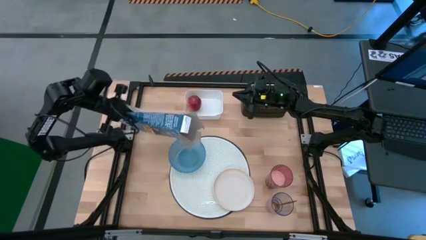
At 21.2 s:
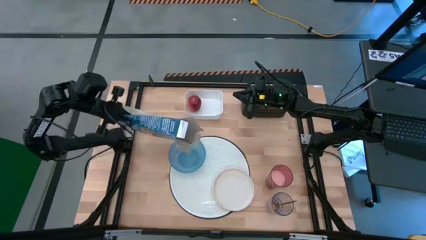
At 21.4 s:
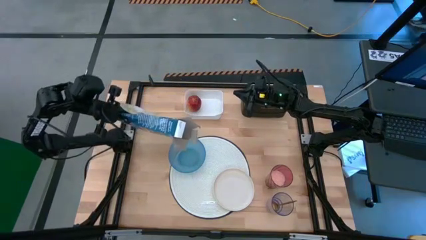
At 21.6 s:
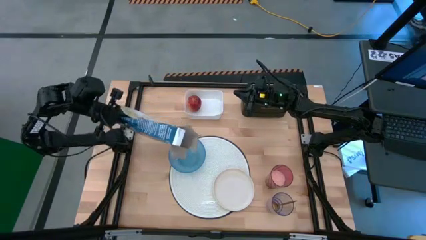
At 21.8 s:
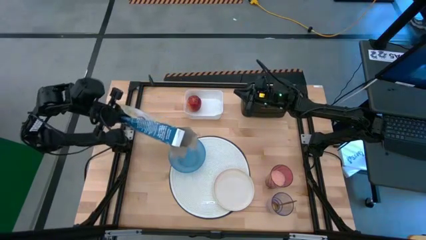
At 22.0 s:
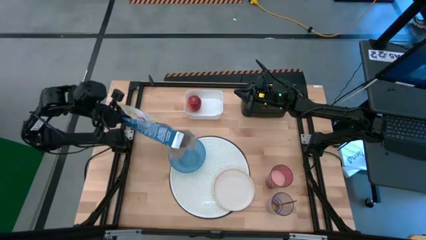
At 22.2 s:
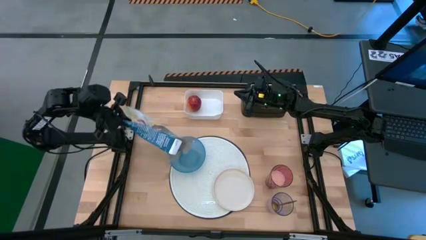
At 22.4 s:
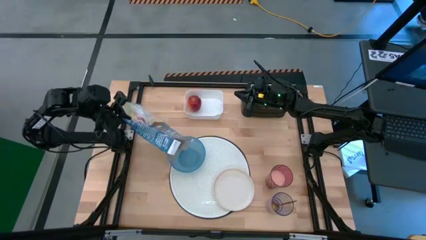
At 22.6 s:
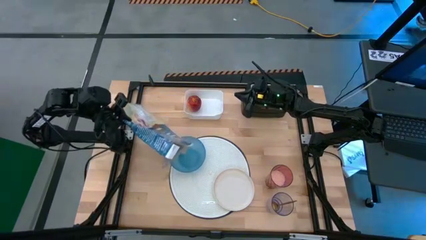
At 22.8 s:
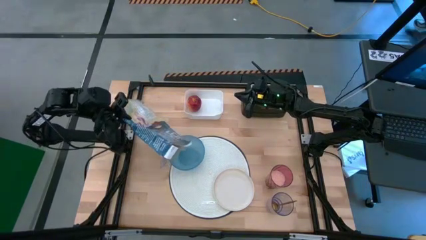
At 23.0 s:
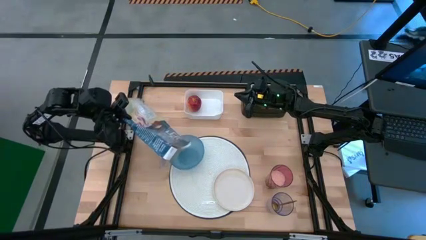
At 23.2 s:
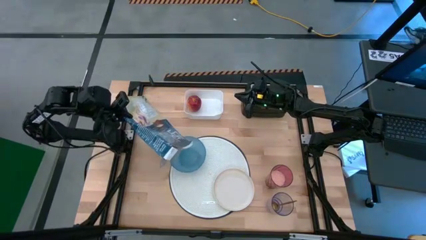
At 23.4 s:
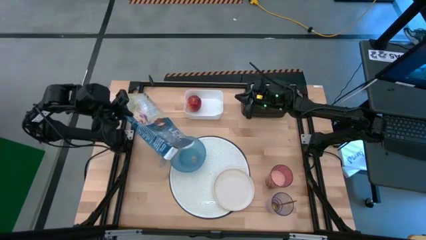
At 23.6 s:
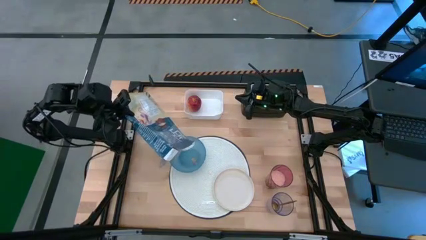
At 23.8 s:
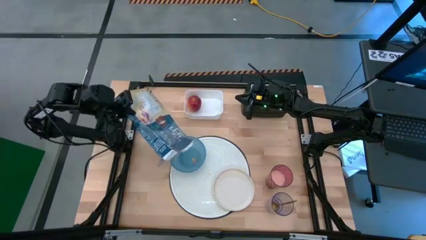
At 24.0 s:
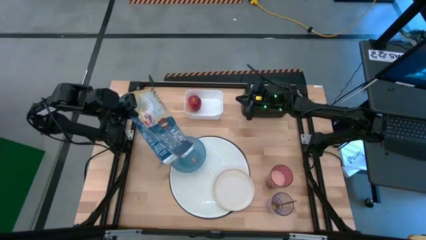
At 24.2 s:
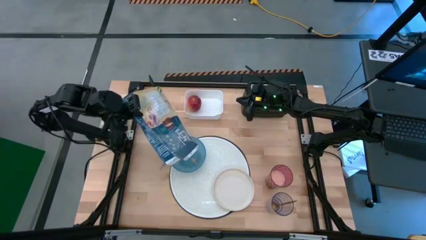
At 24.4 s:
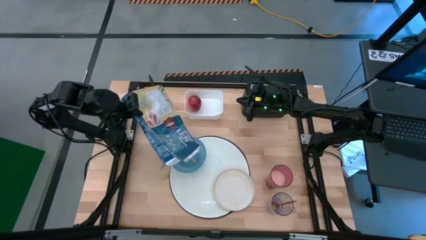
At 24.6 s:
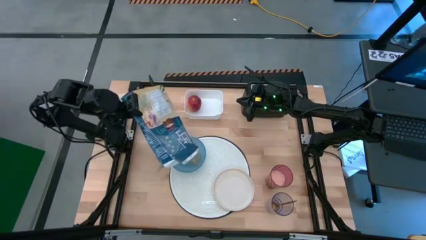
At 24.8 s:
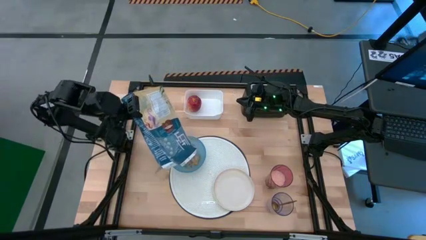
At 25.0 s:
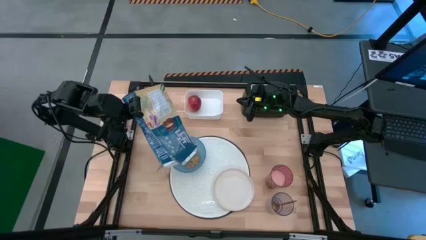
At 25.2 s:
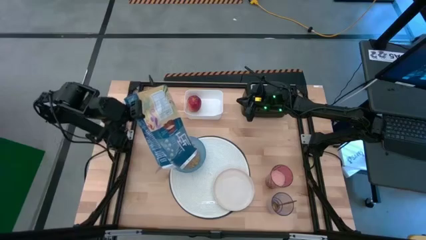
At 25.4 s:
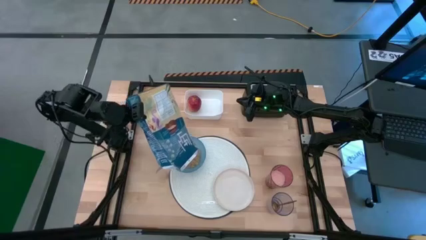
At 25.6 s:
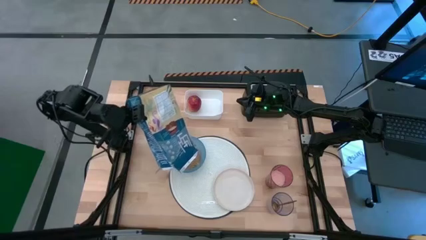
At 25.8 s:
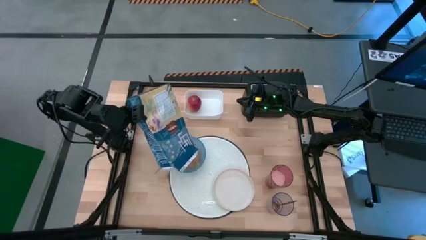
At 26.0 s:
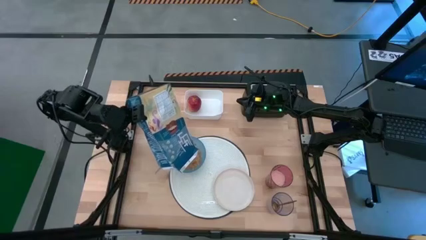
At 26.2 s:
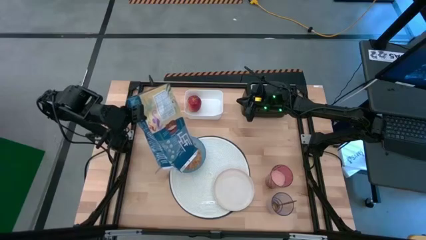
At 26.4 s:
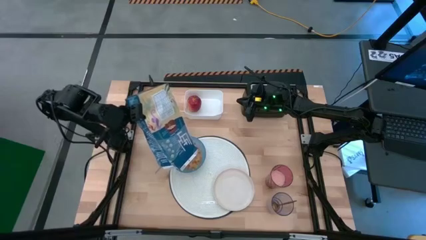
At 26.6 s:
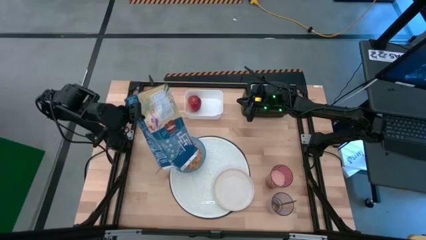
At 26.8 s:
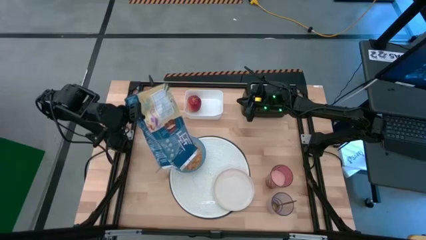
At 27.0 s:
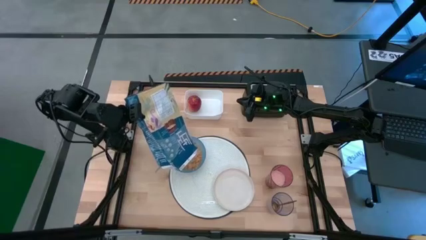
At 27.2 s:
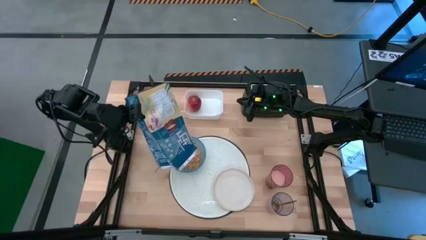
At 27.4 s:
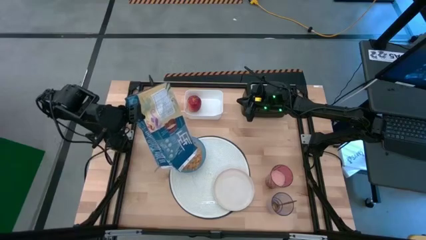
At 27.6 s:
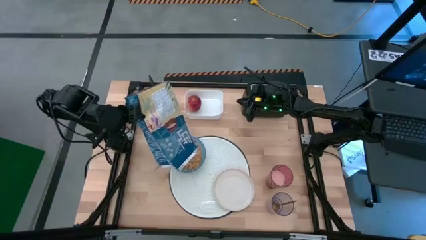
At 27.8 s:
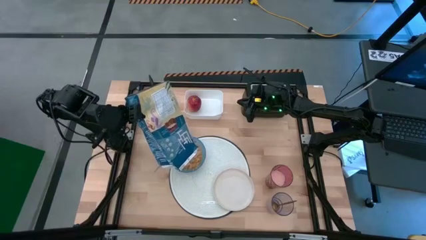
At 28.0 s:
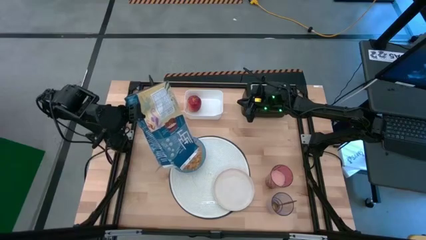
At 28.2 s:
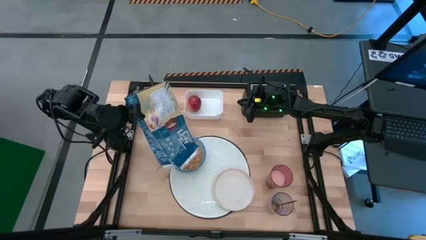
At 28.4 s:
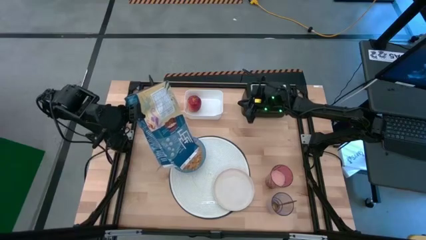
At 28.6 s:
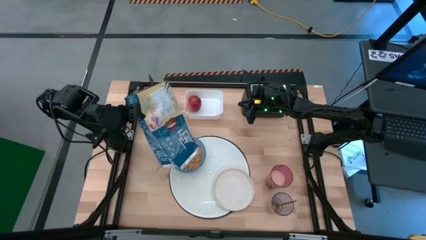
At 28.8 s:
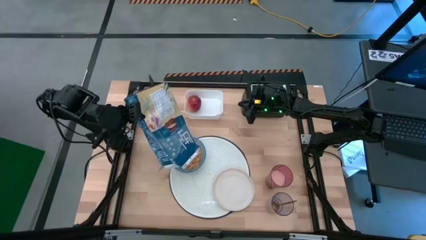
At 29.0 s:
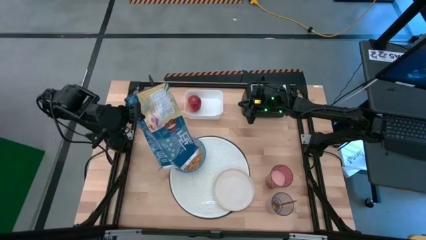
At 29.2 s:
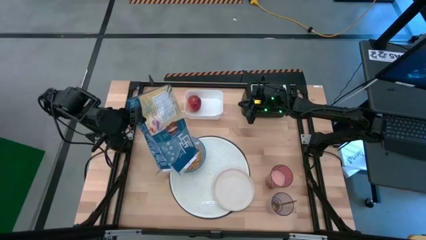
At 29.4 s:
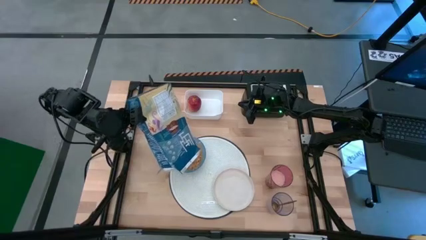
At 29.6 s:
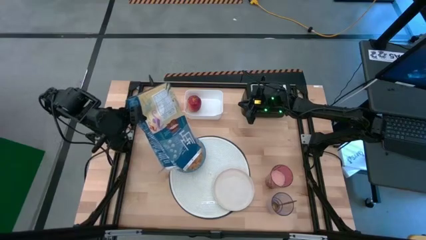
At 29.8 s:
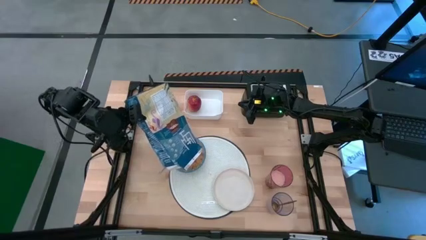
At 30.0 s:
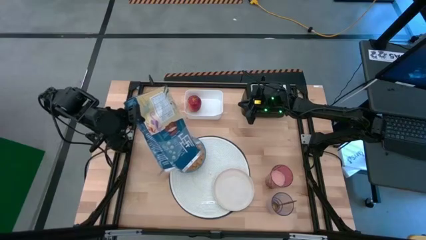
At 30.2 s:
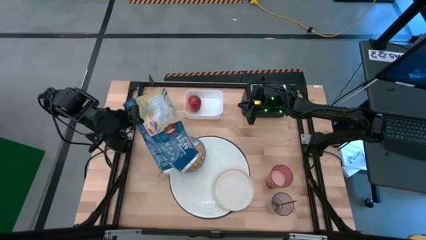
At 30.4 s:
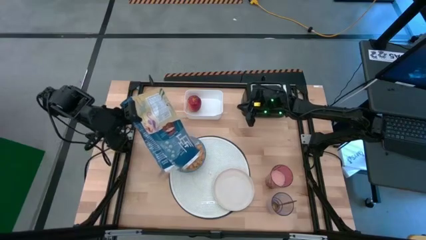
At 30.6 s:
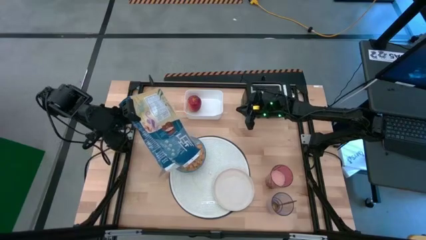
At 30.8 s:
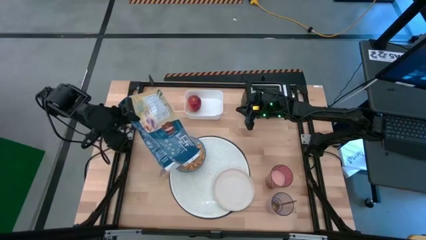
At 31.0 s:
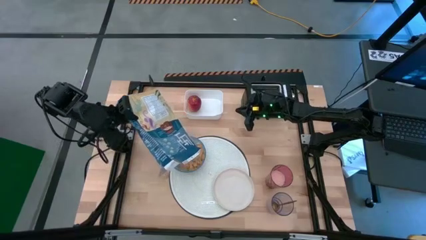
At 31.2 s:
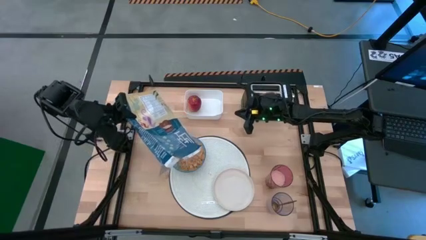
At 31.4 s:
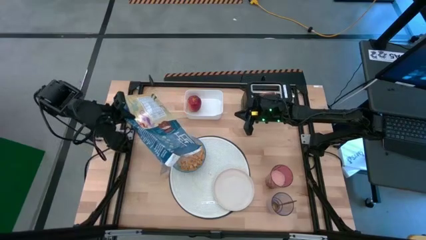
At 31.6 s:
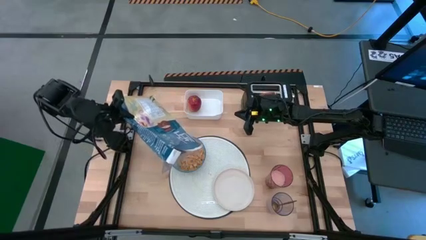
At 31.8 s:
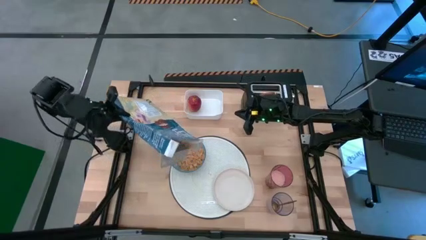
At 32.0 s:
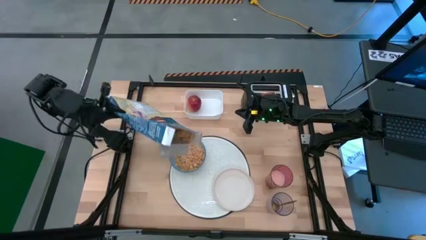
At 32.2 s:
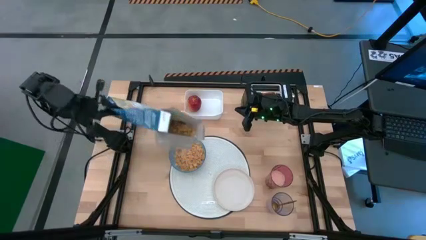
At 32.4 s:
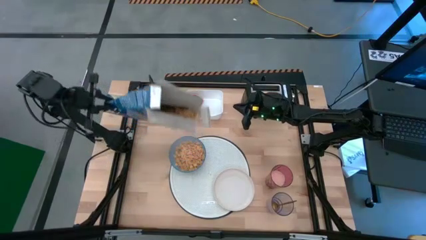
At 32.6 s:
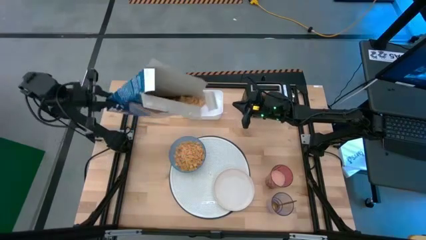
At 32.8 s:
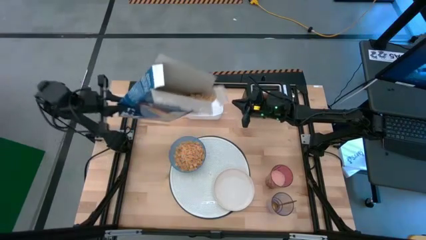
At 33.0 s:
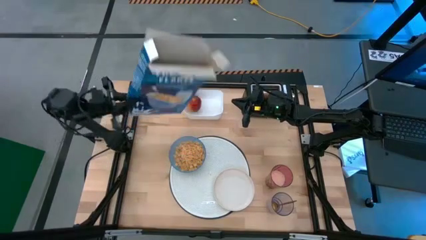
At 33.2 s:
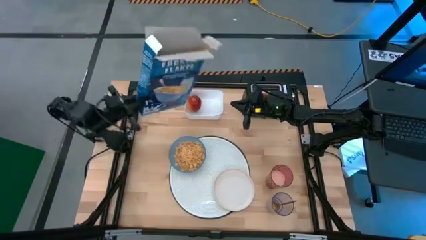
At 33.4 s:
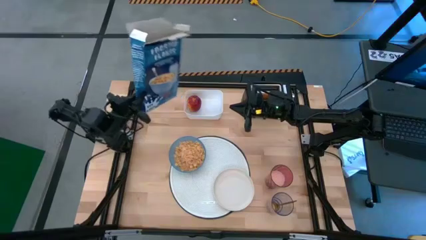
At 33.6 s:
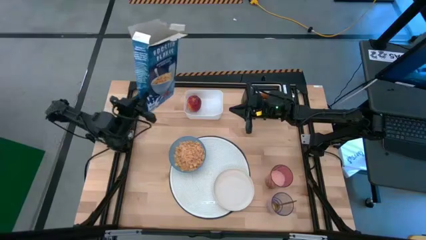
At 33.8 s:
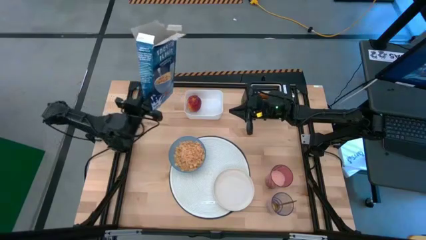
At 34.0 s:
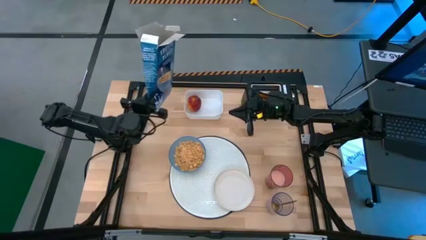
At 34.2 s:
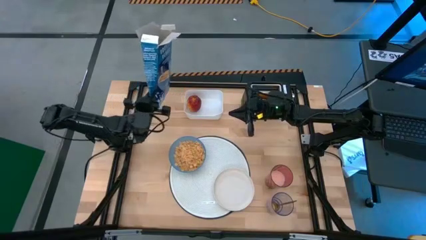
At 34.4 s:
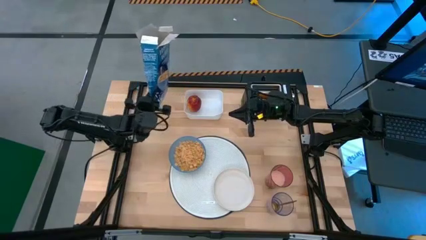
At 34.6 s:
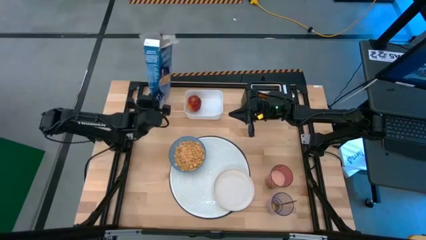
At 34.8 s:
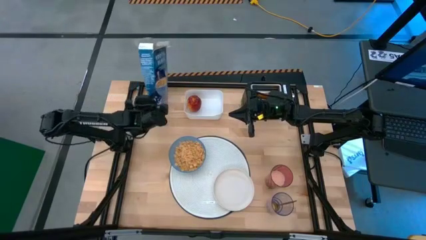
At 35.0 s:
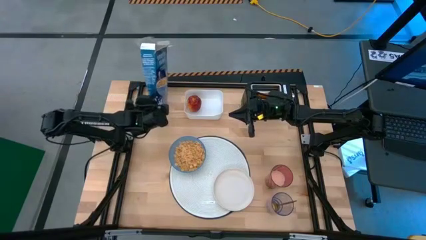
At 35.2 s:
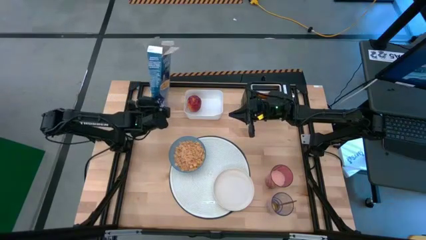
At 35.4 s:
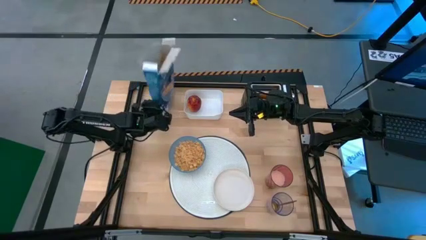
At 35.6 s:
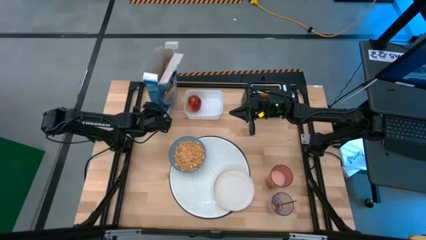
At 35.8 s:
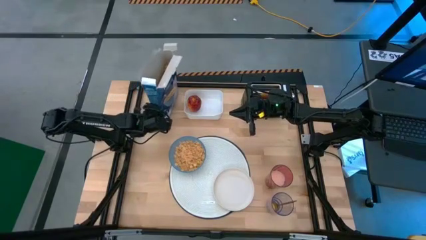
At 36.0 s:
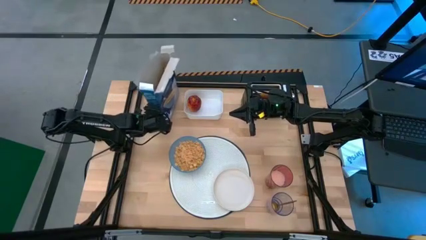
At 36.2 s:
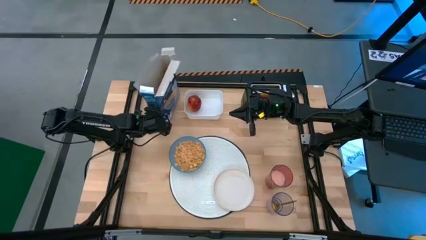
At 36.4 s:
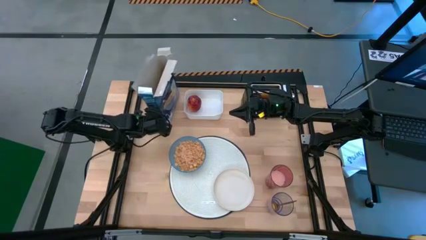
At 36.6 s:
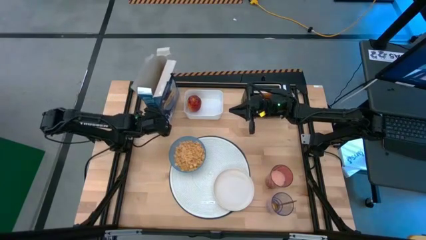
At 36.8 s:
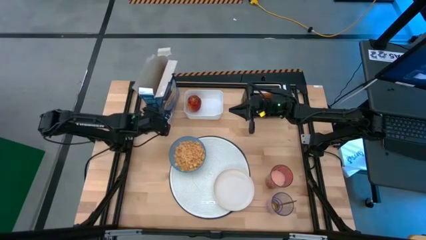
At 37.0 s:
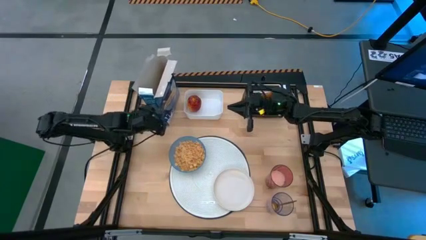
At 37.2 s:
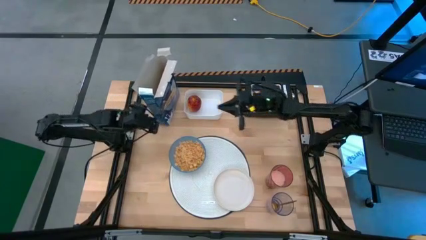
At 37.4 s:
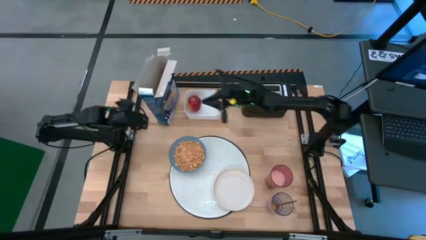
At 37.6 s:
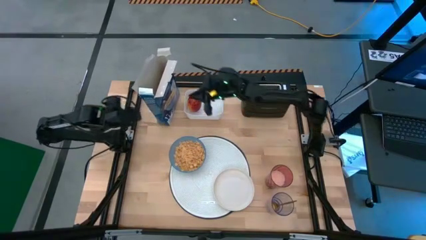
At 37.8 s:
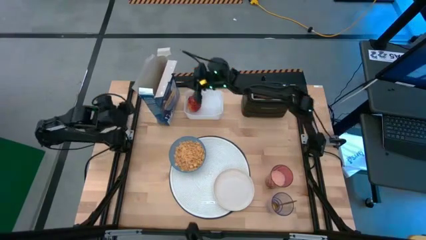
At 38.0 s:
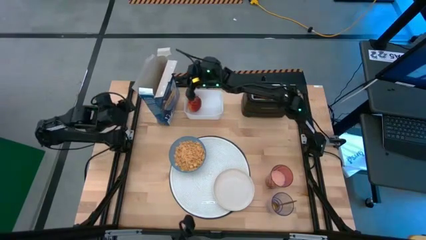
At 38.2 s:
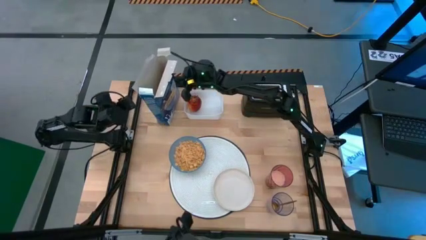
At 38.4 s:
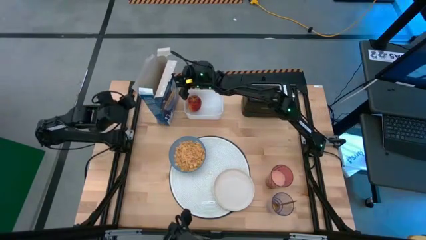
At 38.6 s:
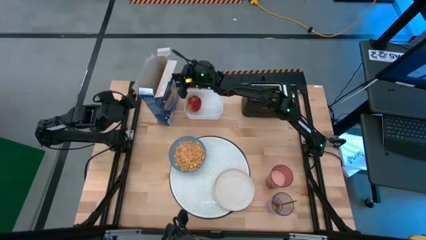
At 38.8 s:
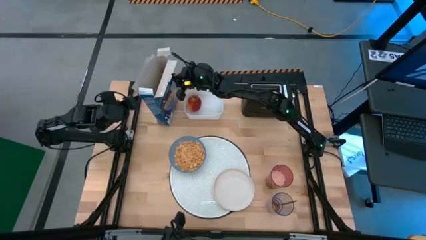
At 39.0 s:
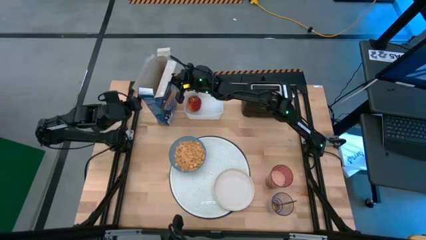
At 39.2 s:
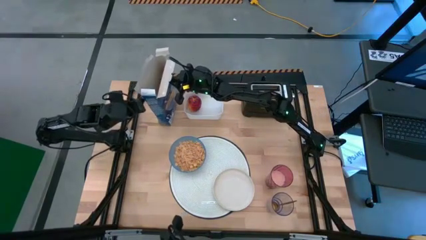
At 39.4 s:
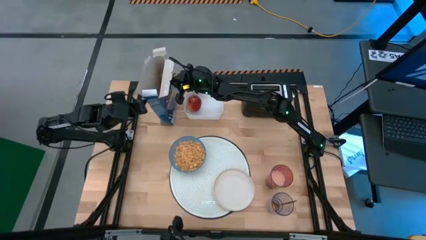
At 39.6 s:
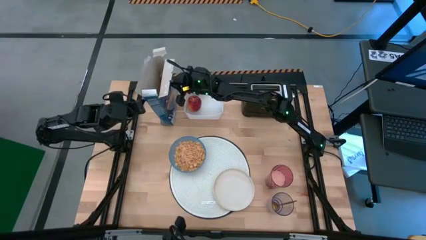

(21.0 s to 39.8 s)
Task: Arrange a breakfast setting
Pour the cereal from the cereal box into the blue bowl
